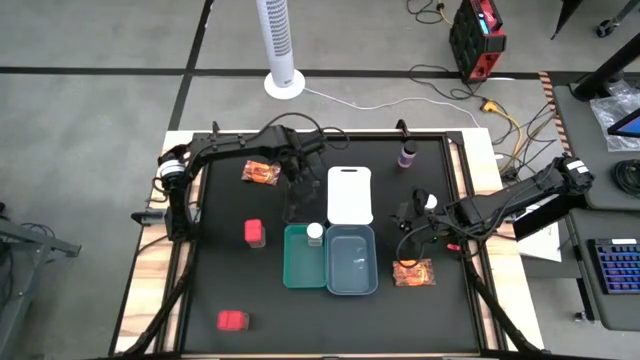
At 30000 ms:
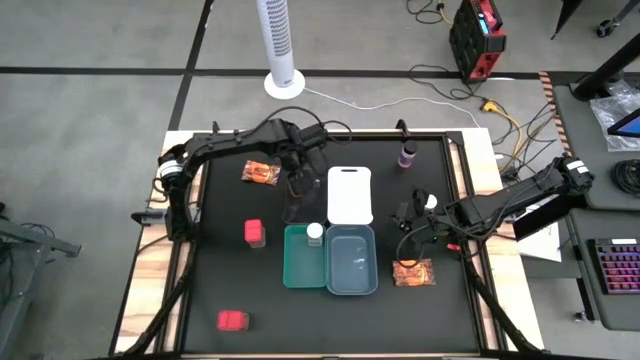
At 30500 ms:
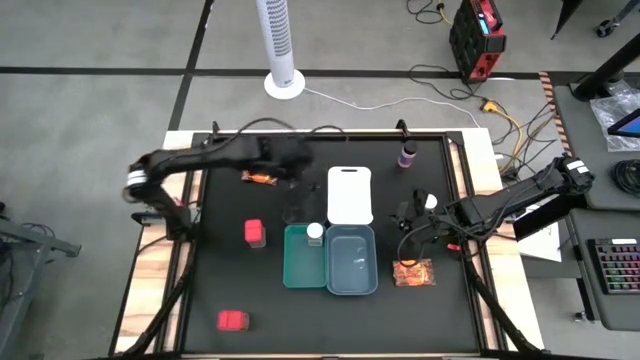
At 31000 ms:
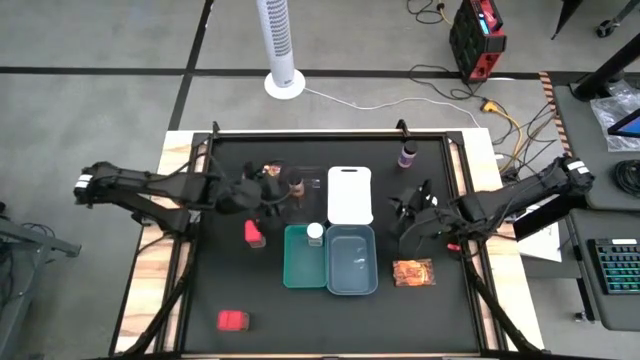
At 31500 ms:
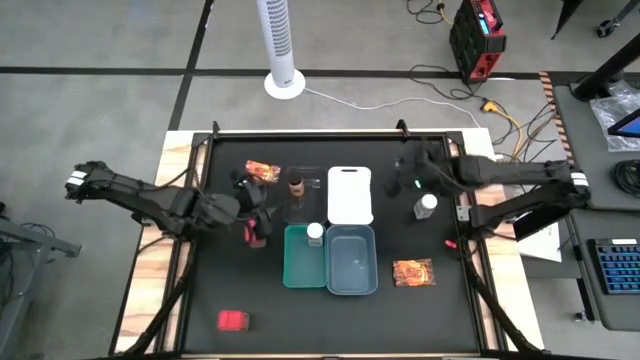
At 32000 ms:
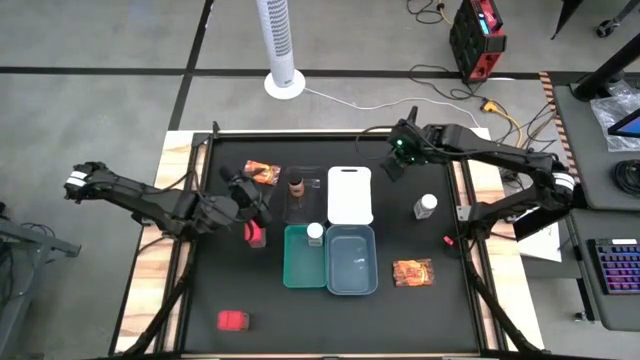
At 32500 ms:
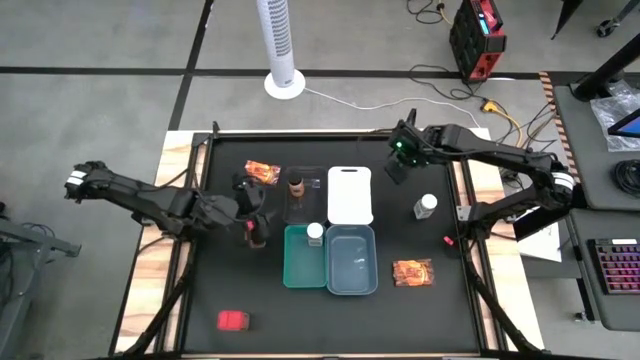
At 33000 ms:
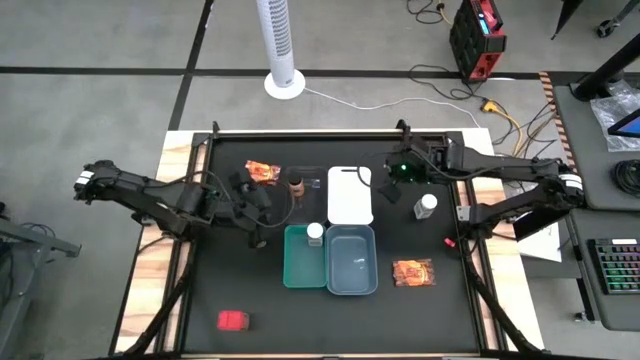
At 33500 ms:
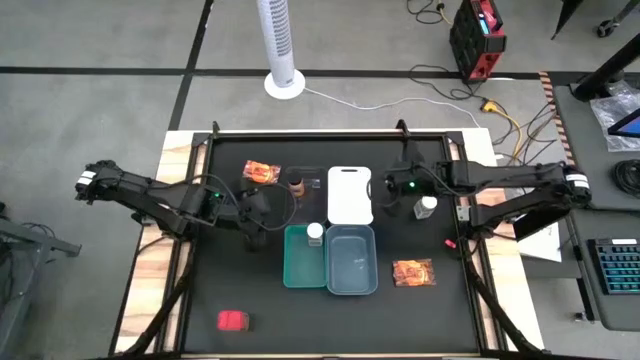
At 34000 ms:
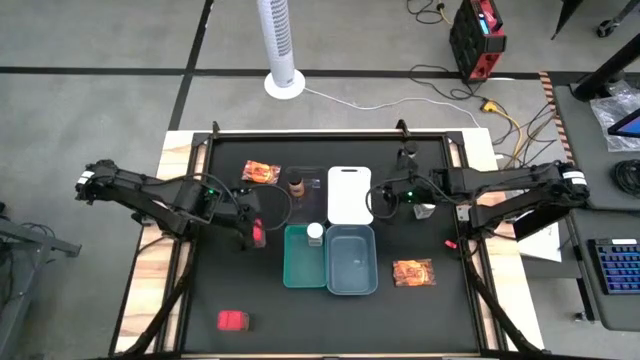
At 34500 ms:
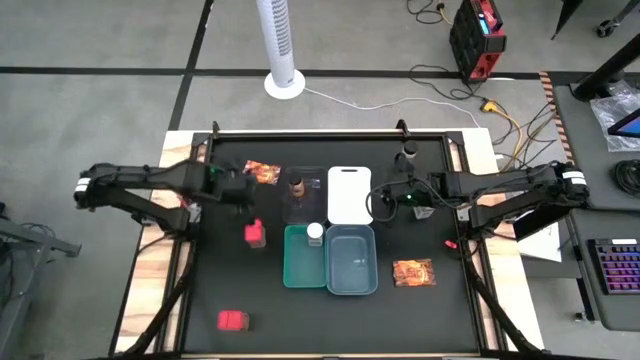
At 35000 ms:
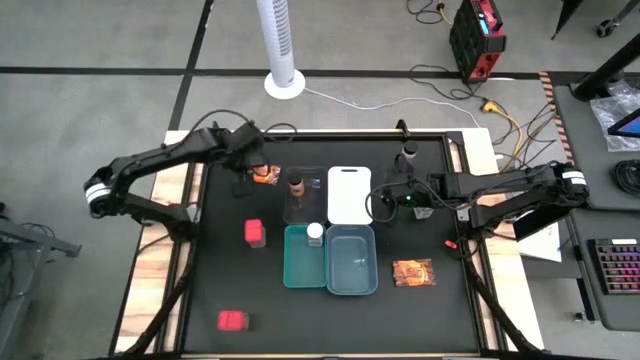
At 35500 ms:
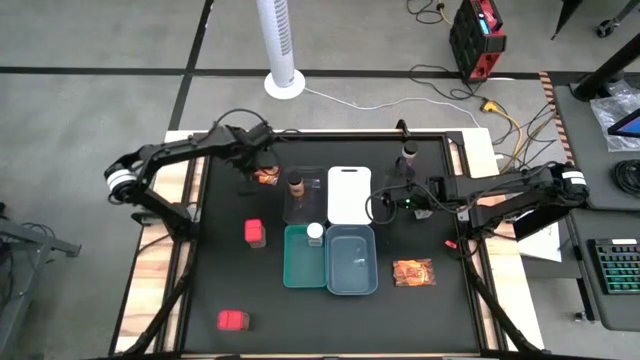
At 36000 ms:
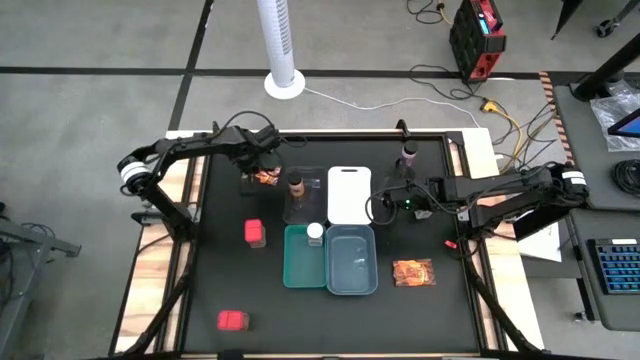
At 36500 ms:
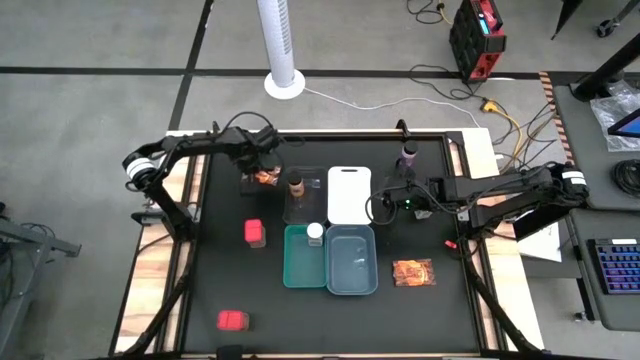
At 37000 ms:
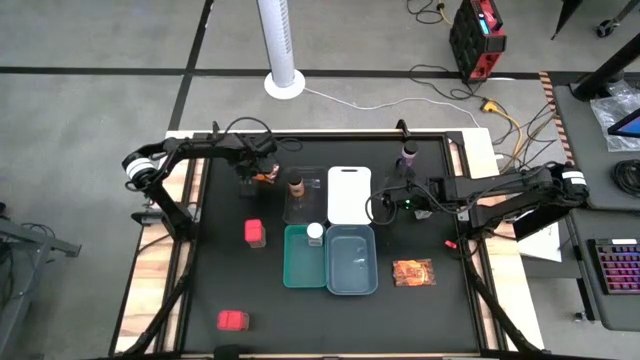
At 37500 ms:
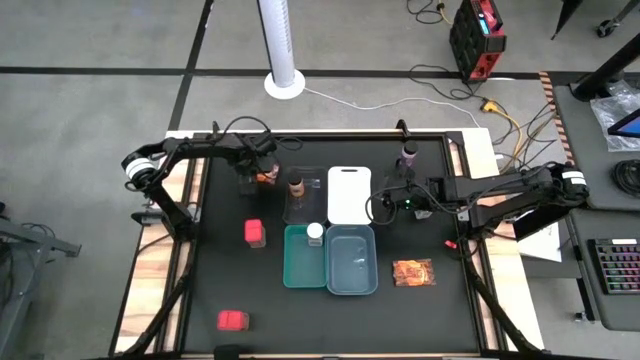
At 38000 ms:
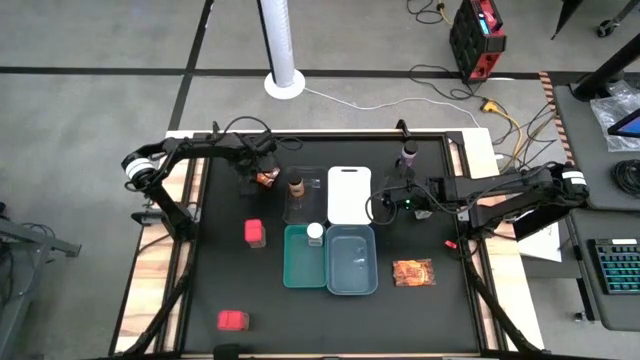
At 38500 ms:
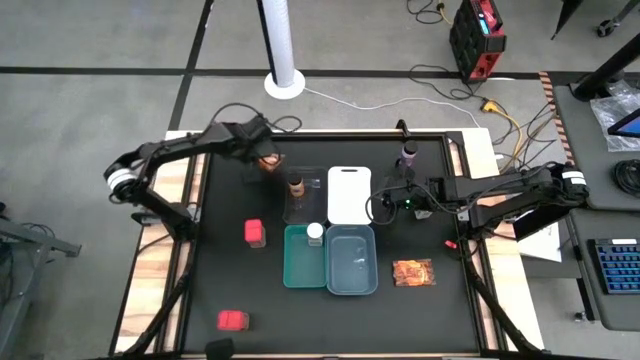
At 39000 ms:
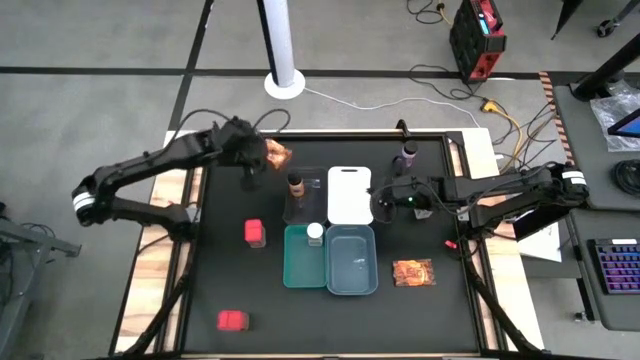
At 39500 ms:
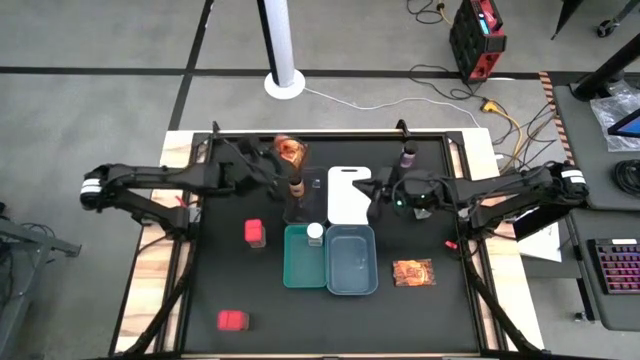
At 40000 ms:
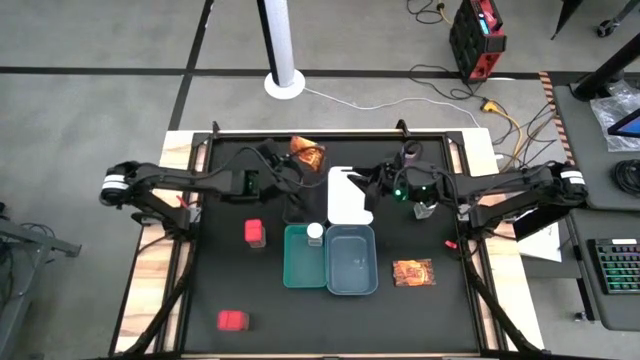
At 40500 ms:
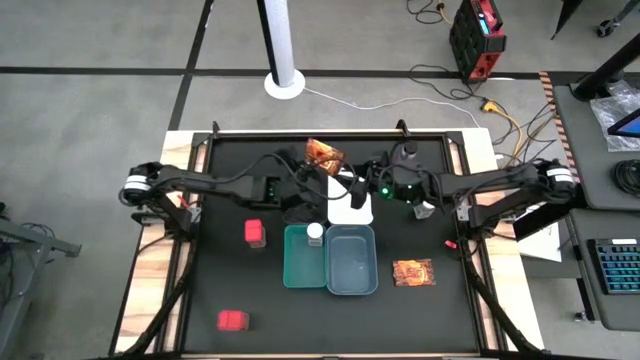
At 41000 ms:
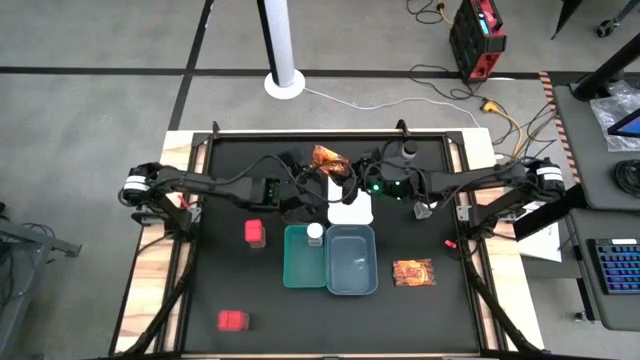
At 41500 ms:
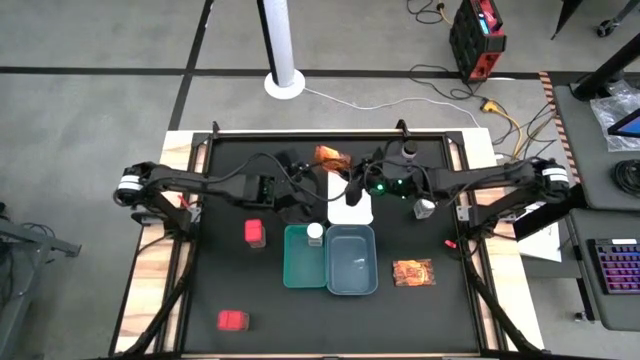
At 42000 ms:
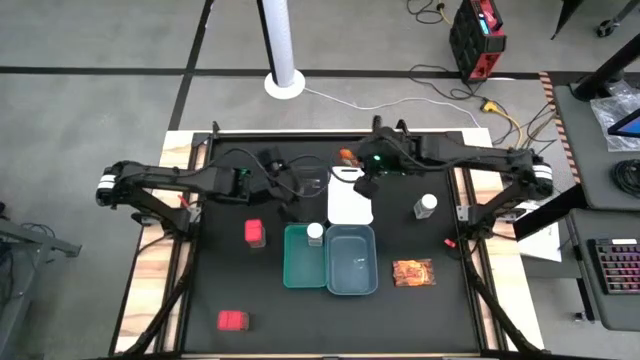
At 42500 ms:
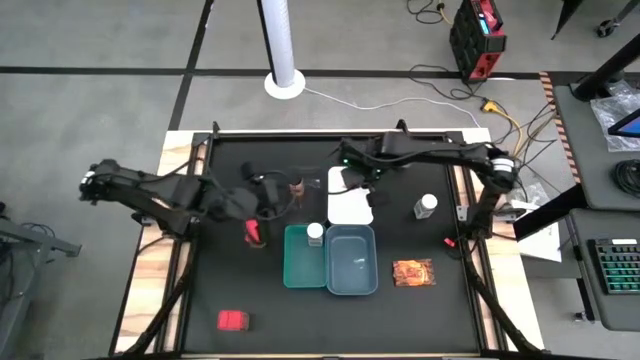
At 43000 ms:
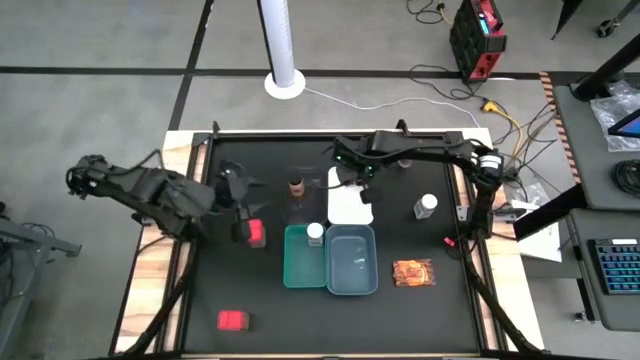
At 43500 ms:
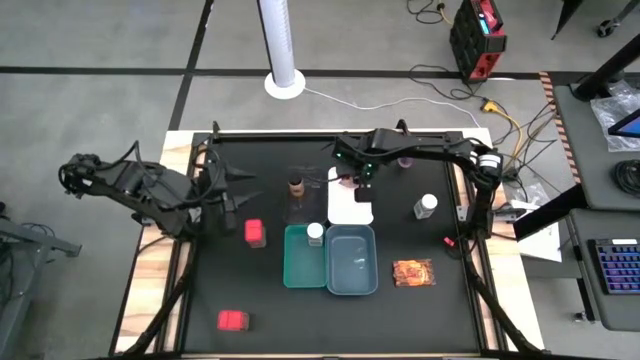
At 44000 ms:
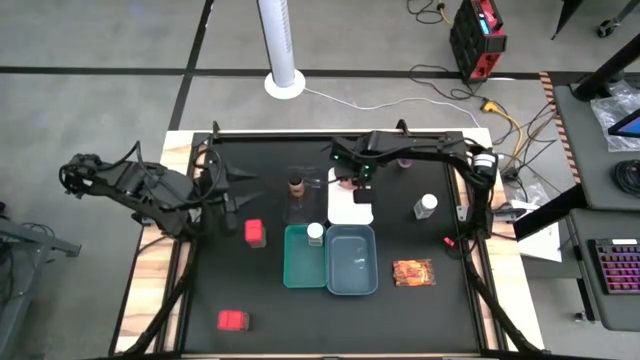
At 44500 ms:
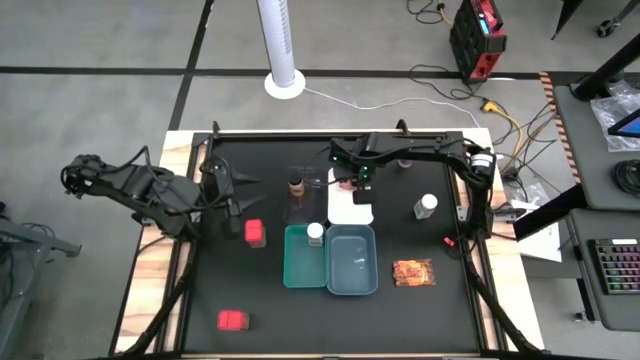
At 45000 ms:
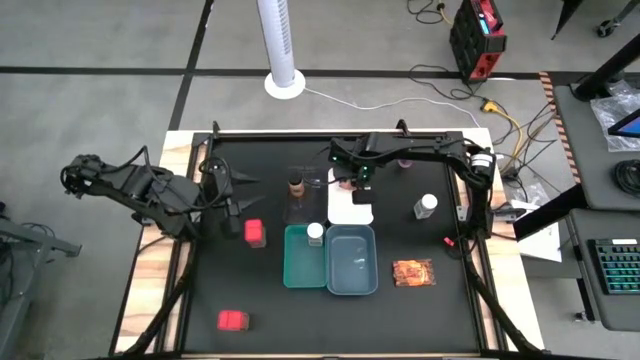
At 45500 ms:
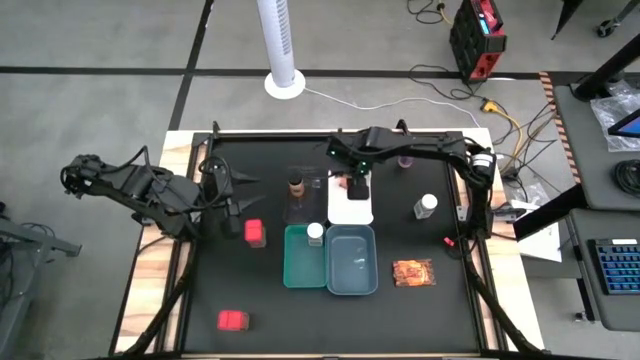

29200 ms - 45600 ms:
Task: Sort spices by type
Put the left orange seasoning pack into the white bin

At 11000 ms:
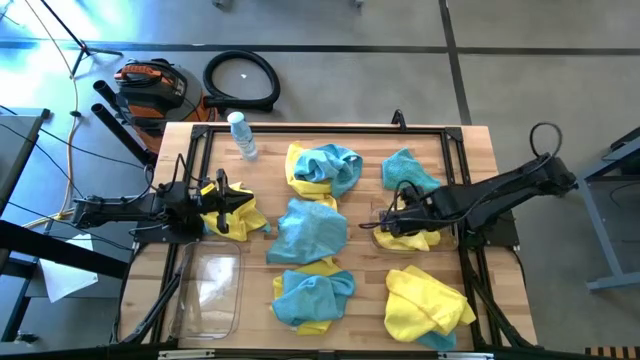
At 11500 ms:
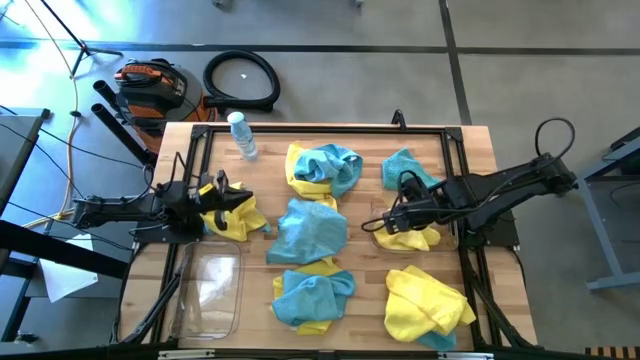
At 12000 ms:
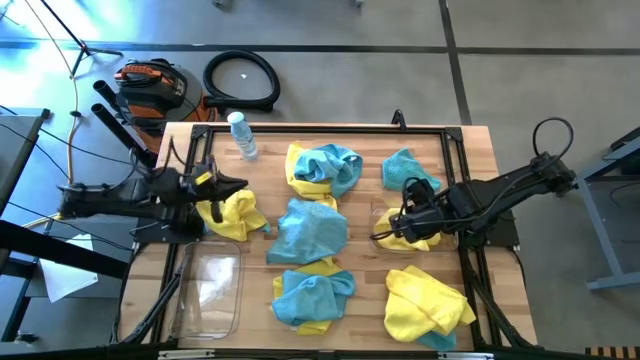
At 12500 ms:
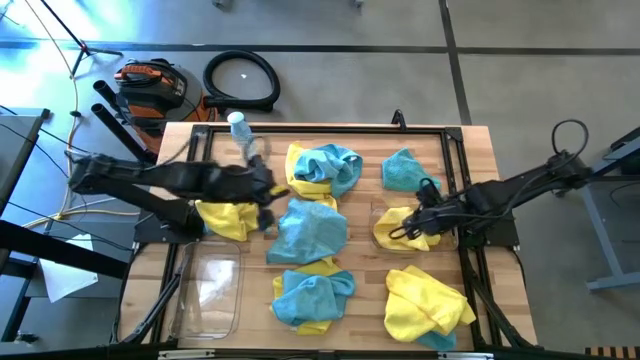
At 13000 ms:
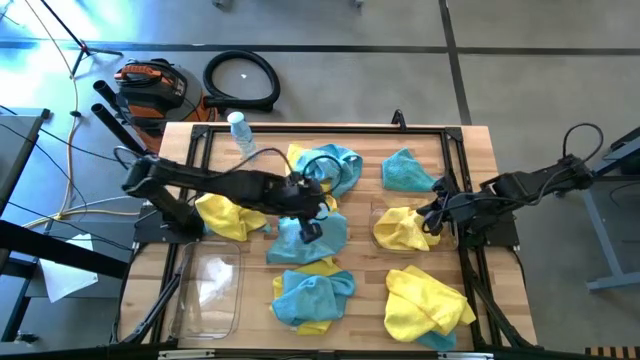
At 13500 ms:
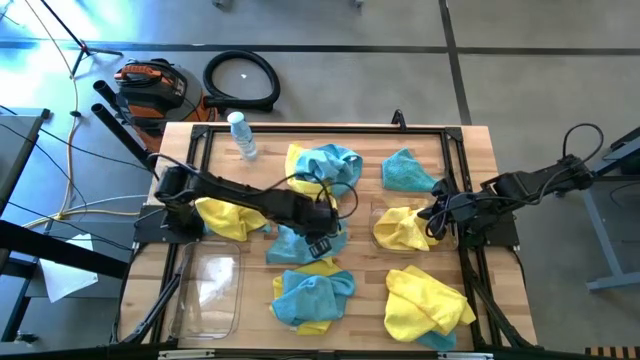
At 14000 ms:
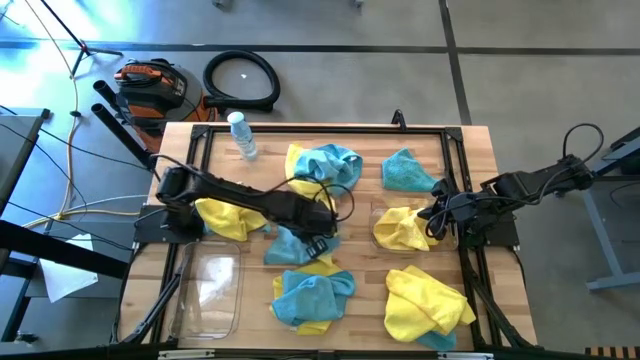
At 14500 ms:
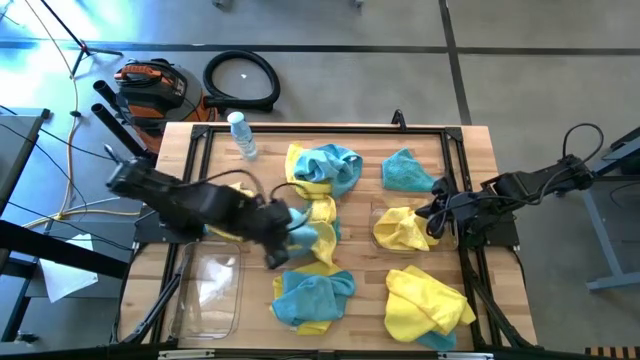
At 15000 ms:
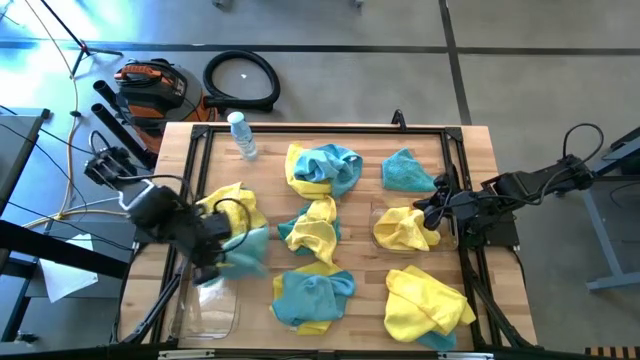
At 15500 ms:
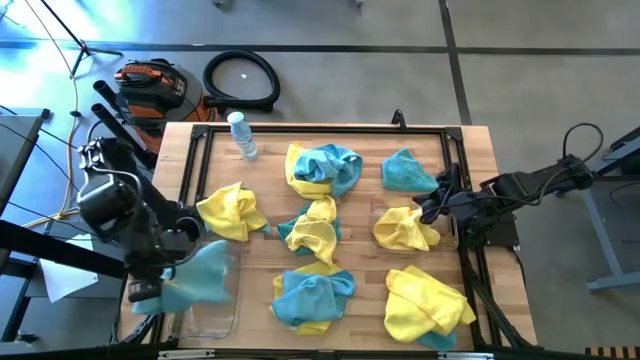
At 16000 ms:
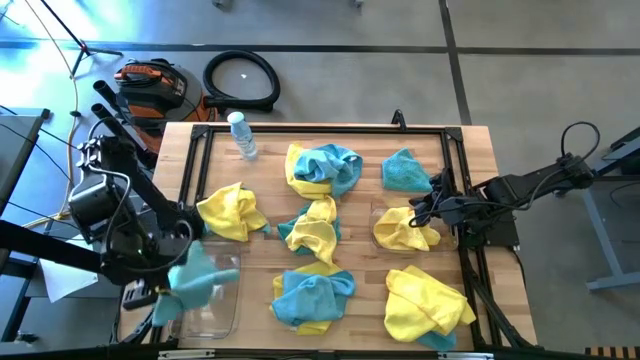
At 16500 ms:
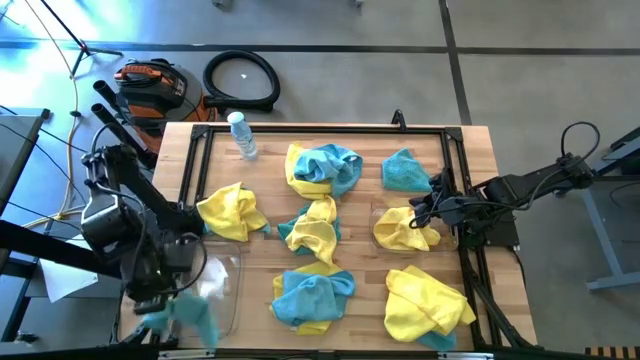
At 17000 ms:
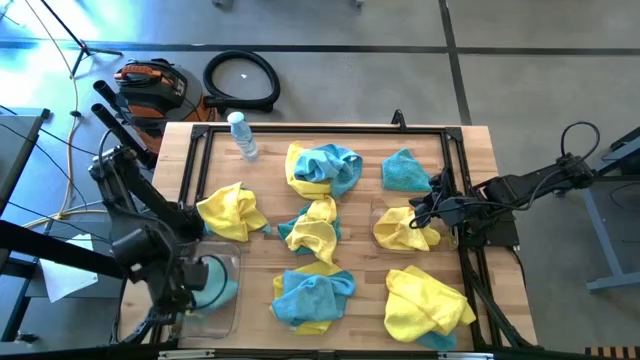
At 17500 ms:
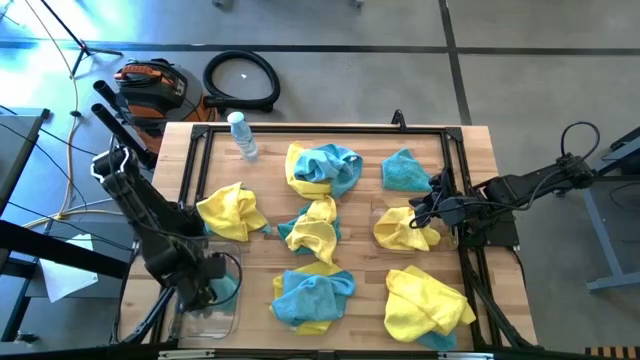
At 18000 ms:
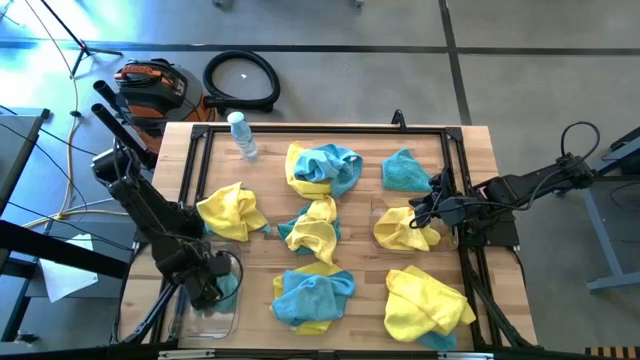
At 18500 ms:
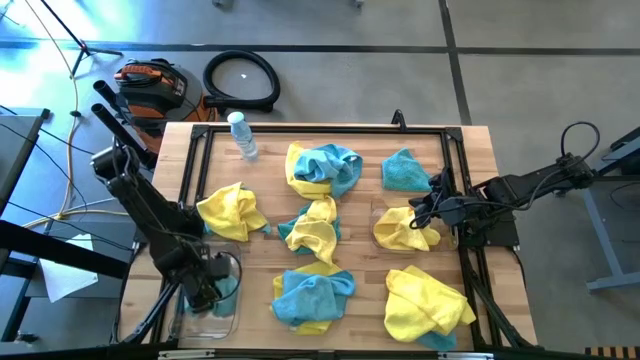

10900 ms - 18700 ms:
Task: Sort microfiber towel by color & place in baskets
Put the blue microfiber towel into the left transparent bin
